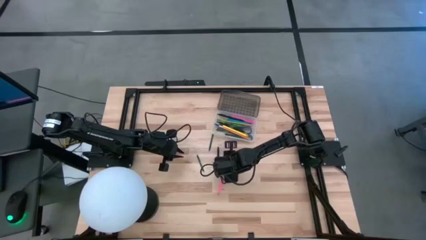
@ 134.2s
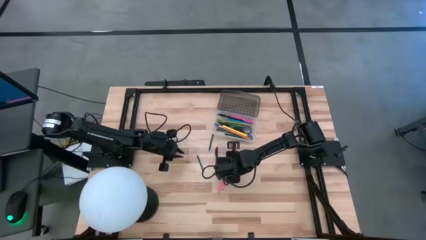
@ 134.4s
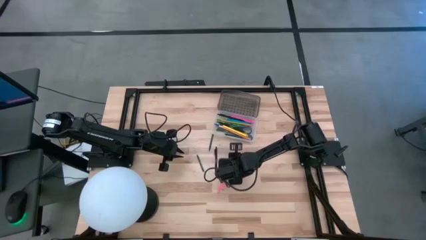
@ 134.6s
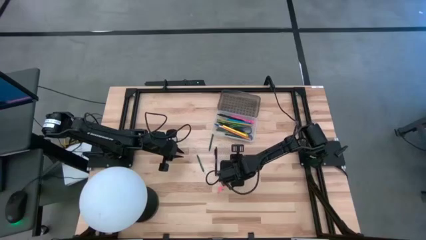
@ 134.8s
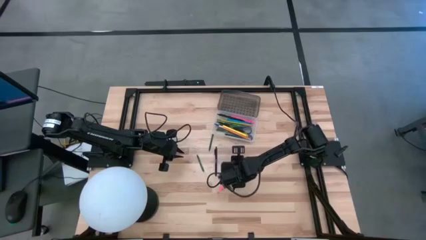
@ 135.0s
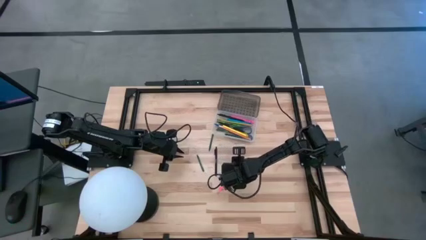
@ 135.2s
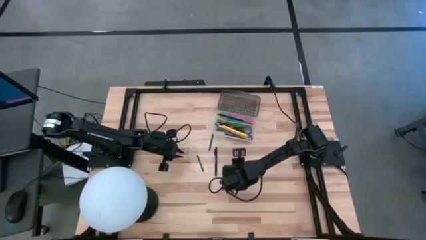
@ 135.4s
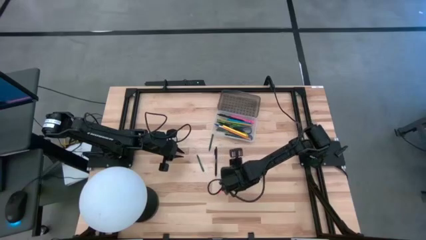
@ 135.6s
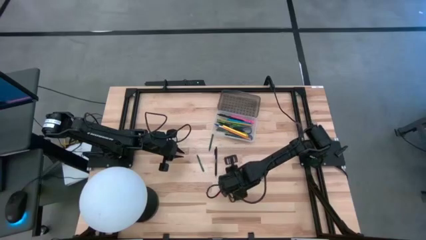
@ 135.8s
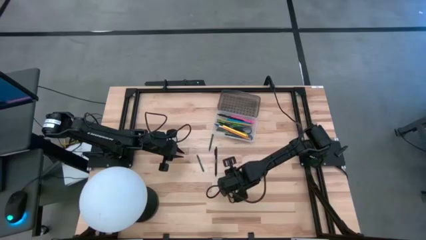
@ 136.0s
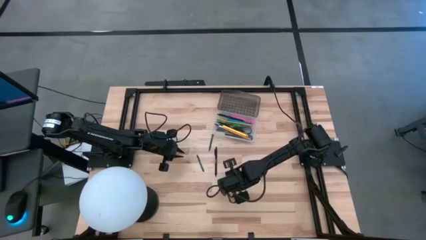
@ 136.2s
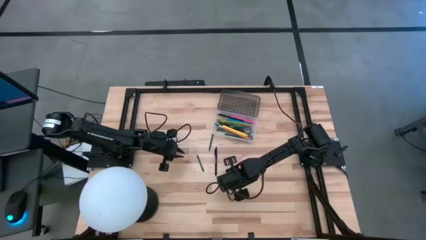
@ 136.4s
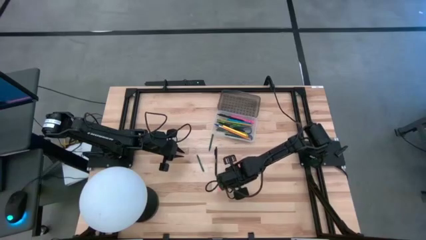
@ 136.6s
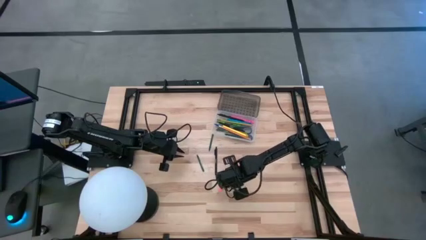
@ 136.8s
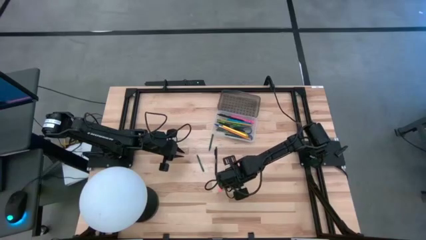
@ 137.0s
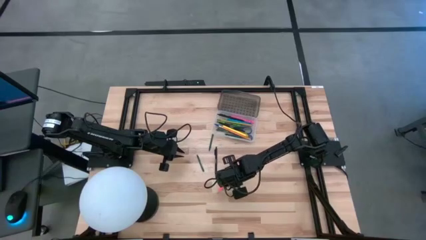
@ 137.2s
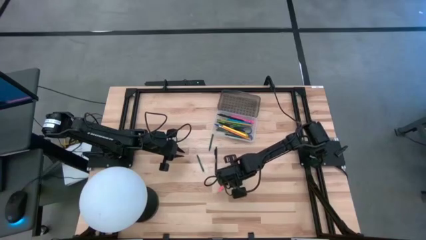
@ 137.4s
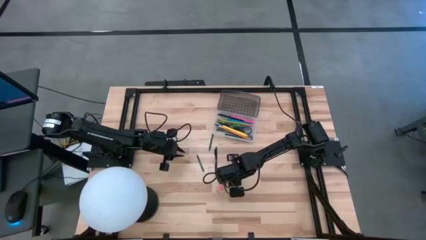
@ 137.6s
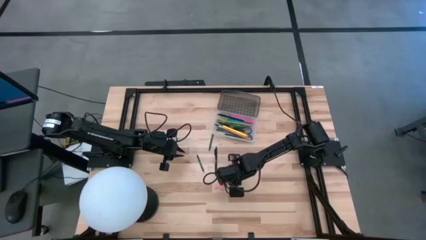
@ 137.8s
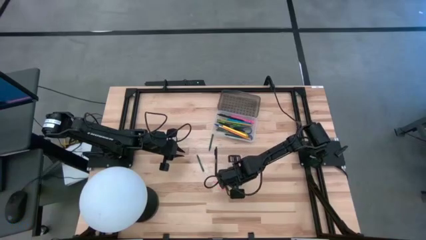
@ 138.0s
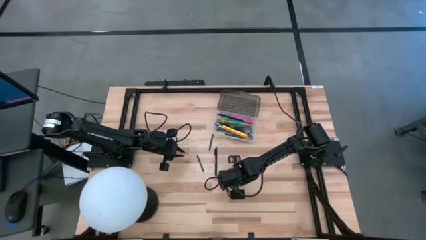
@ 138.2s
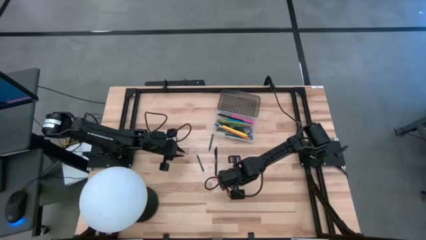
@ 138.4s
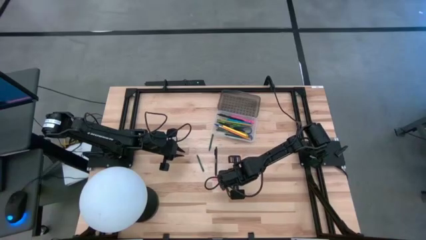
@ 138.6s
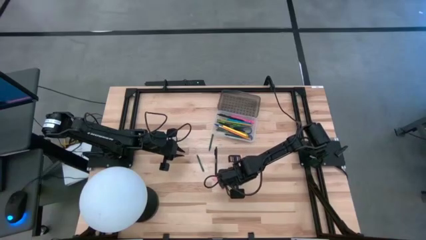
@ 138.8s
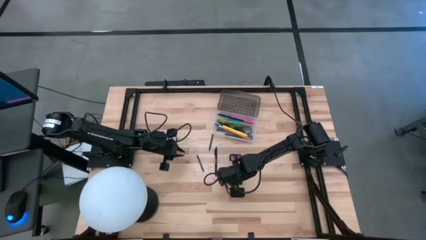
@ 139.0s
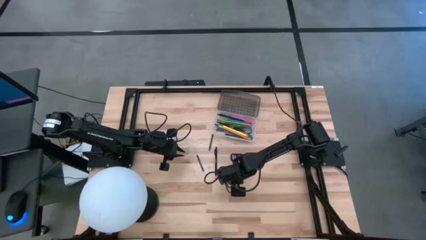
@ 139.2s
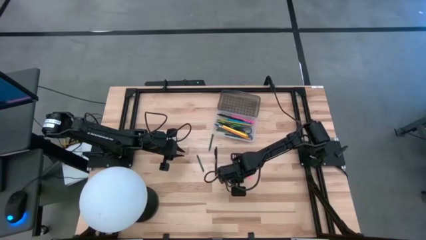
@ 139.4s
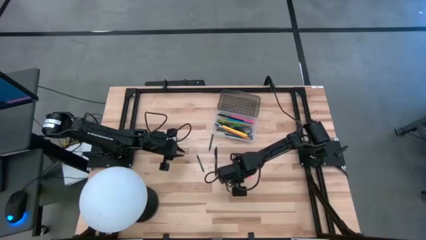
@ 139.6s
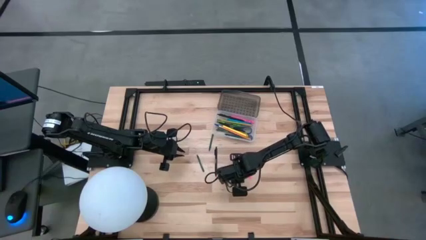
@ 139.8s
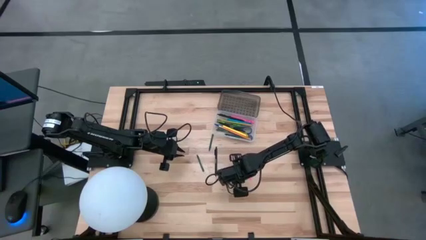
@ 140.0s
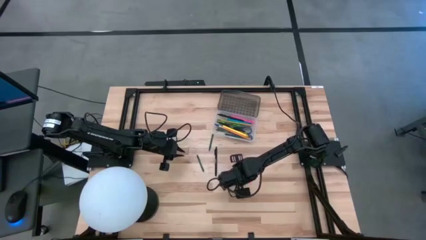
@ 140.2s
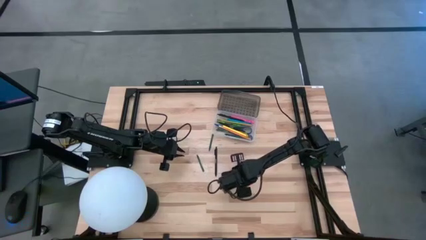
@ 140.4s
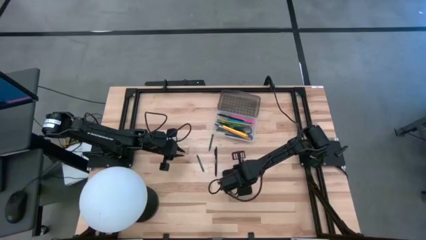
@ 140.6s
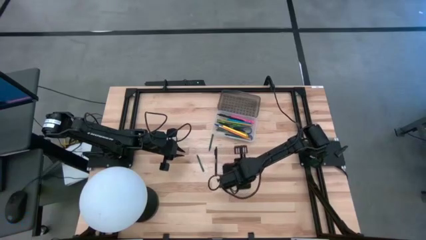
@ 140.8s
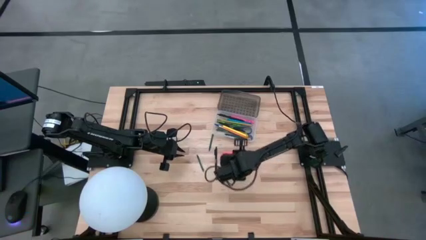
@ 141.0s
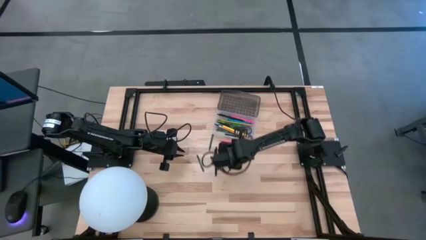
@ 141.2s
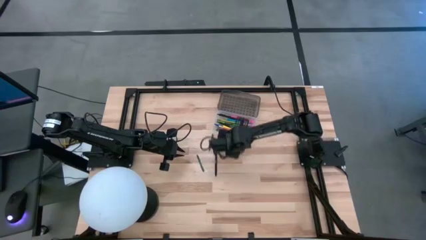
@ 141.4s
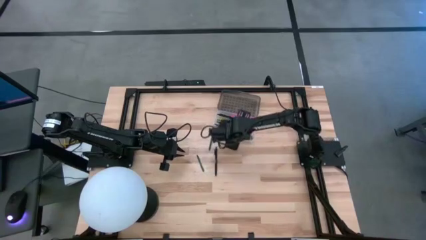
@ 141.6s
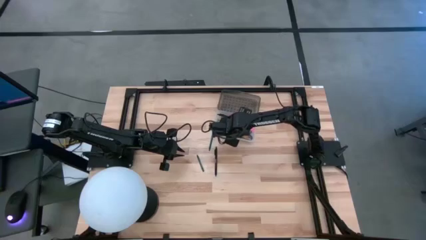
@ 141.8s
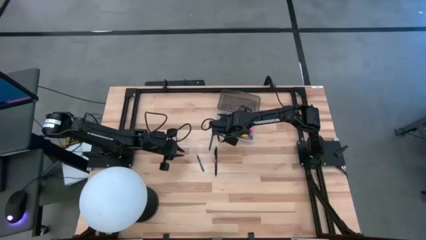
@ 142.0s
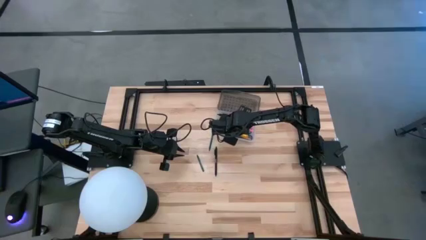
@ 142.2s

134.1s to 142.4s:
Task: Pick & place school supplies into a supply box
Put the pink pencil into the black supply box

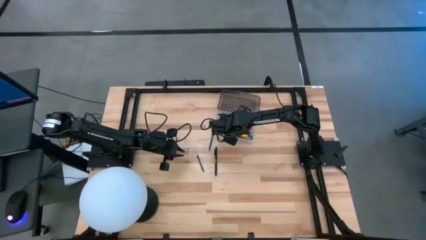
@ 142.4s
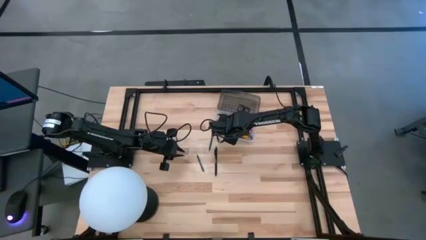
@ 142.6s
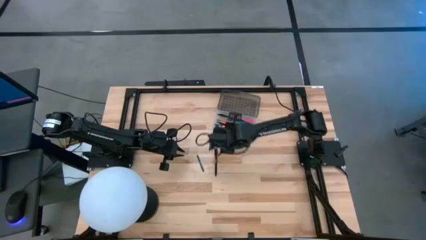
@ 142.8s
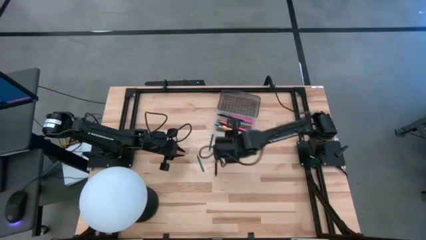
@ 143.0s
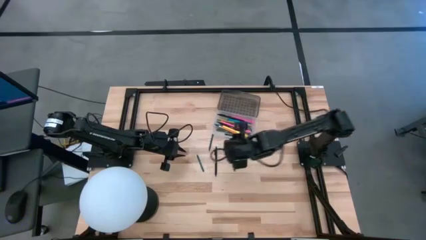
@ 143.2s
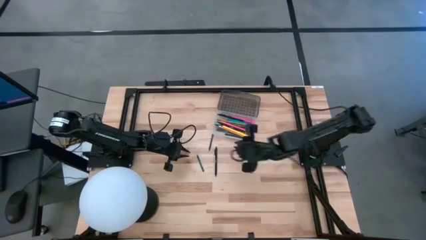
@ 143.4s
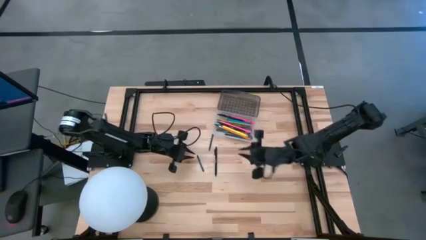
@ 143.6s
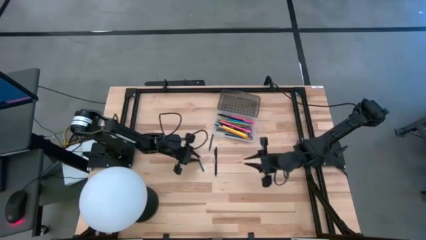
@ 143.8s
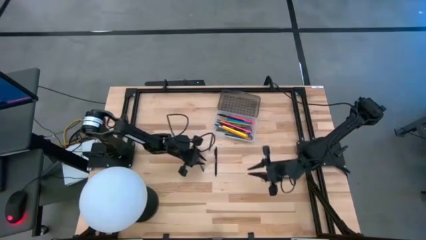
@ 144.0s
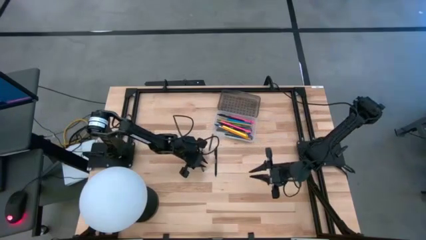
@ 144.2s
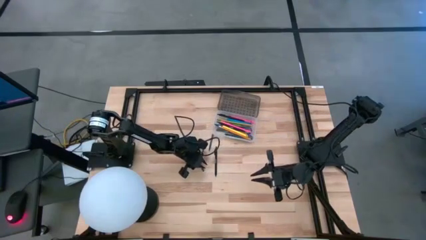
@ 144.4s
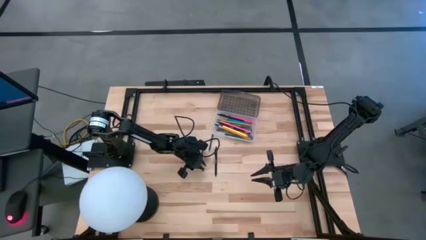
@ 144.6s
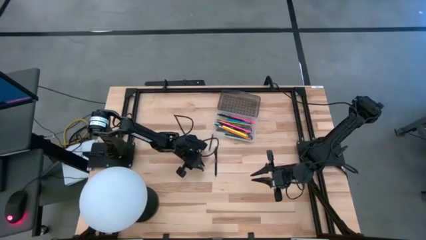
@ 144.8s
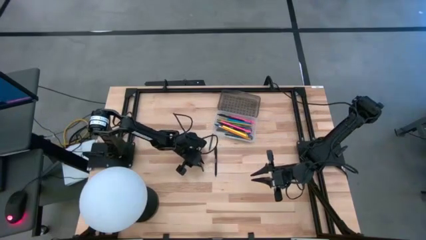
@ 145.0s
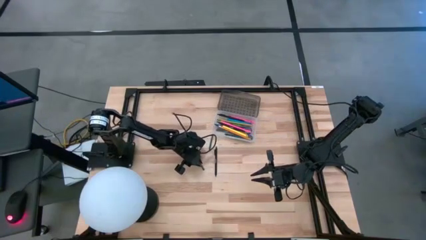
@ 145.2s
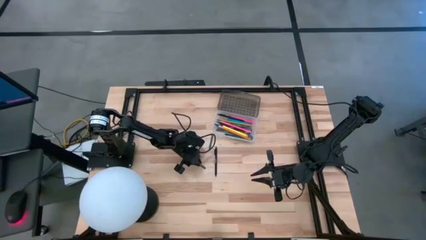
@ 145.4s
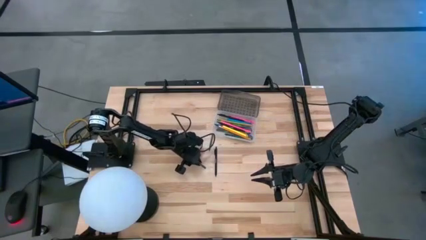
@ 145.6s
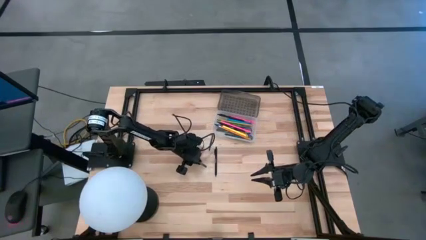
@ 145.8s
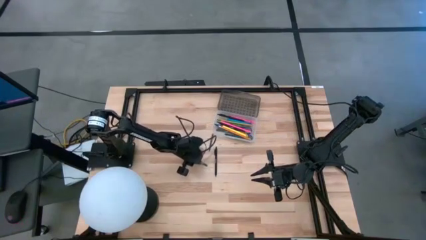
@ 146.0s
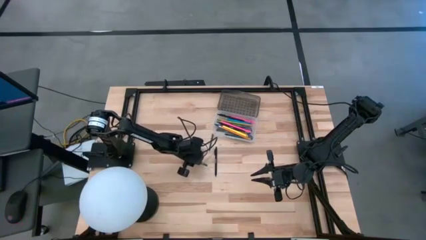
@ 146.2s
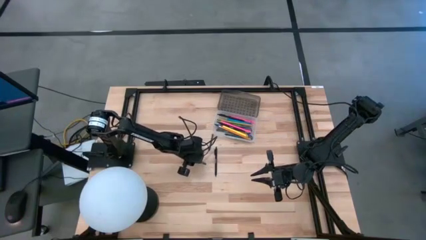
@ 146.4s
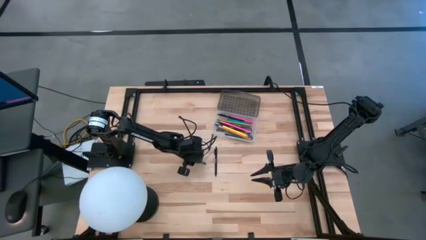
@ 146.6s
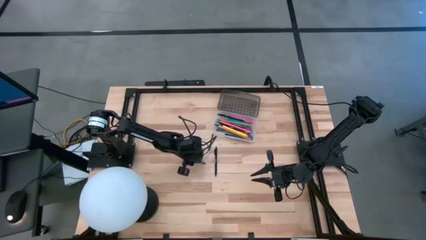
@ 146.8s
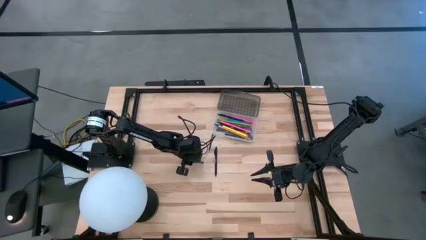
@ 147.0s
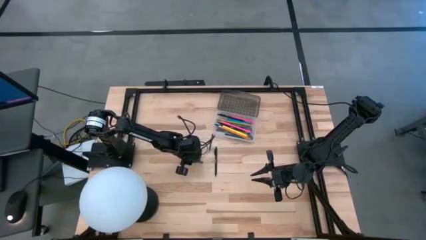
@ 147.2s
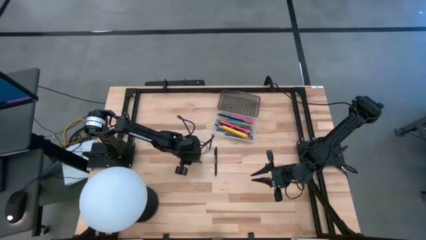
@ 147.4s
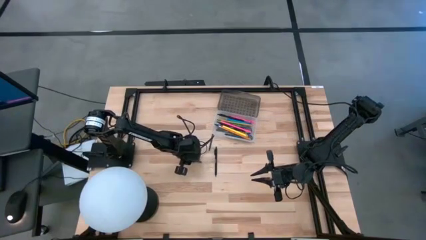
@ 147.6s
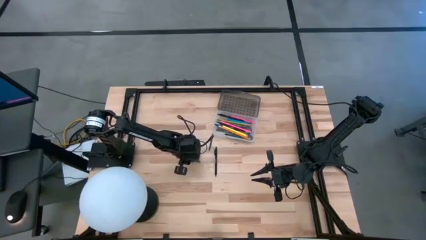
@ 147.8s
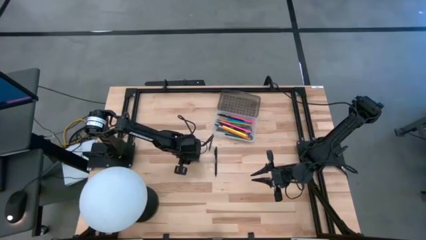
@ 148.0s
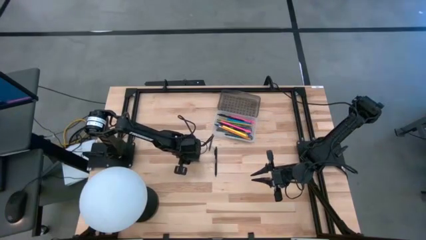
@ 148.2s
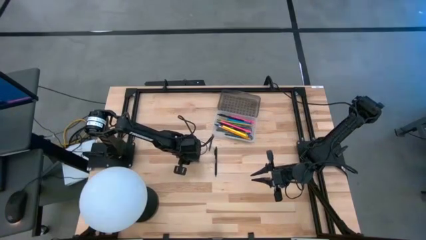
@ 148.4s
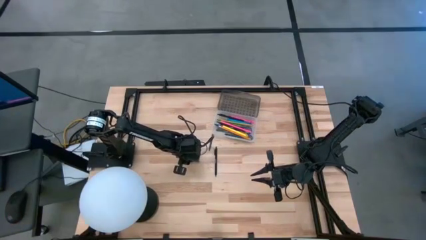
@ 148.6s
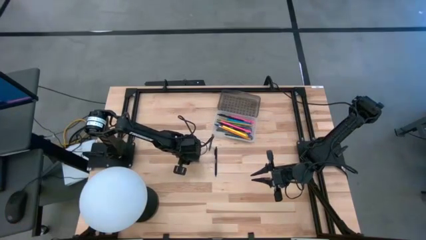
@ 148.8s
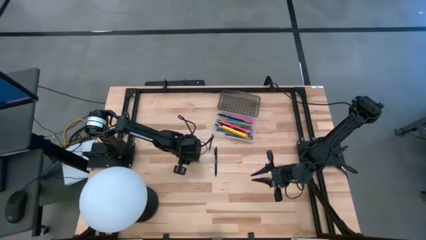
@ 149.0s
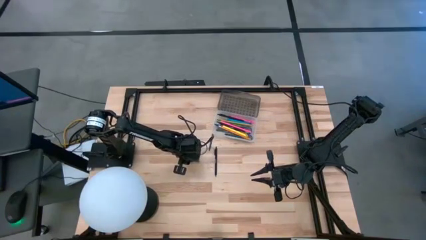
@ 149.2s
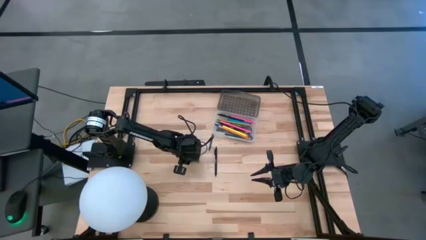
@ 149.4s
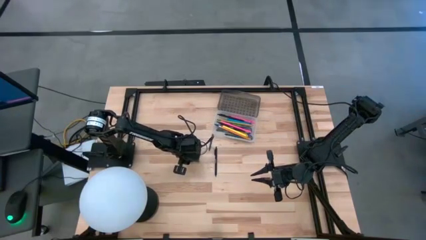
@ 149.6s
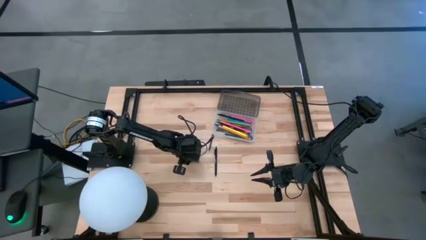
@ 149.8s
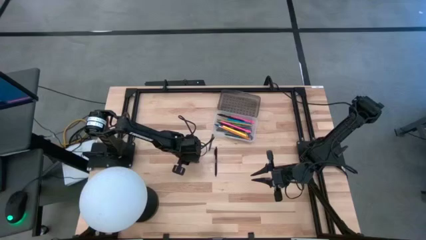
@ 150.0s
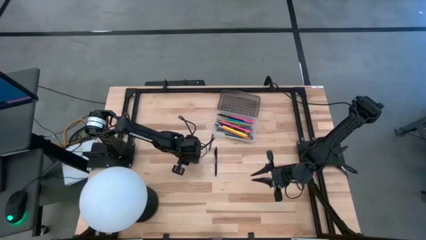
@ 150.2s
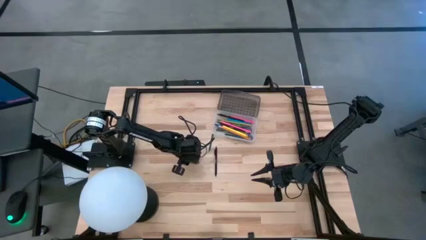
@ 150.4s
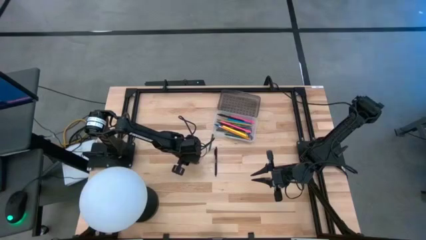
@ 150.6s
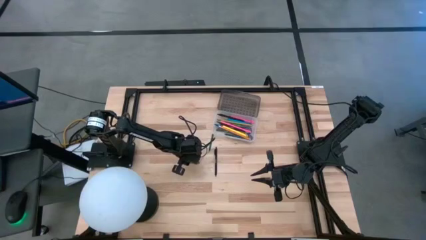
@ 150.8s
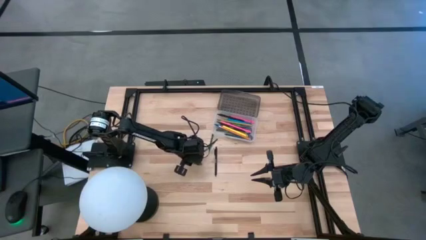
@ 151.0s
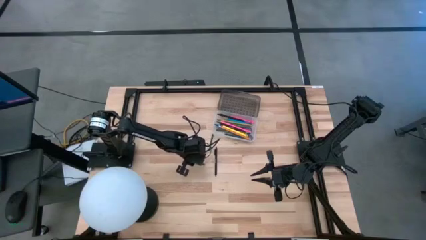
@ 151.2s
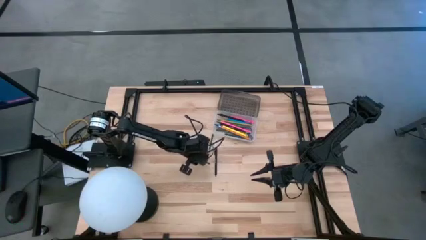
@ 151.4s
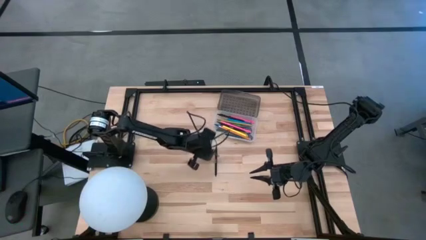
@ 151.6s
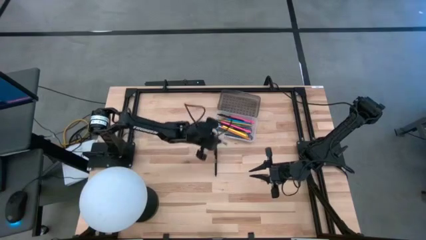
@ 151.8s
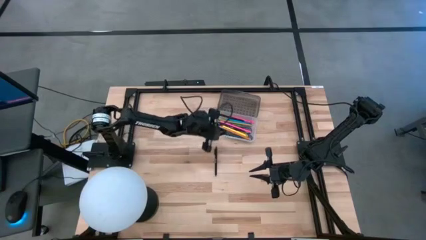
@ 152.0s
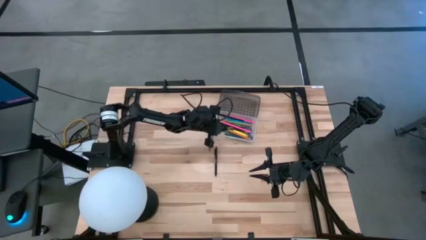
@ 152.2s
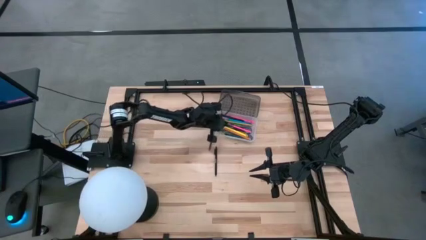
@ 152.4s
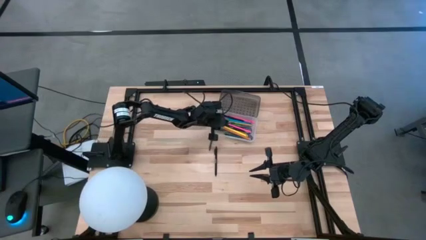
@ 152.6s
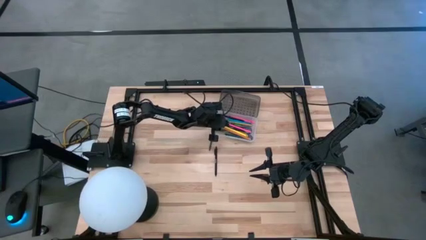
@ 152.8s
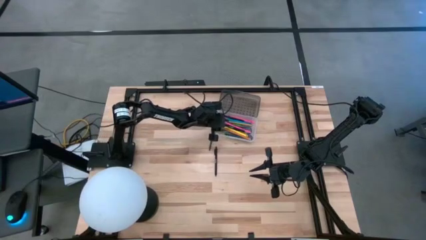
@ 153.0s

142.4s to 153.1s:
Put the green crayon into the black supply box
